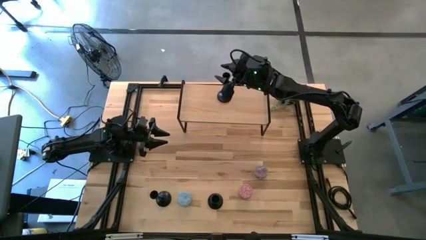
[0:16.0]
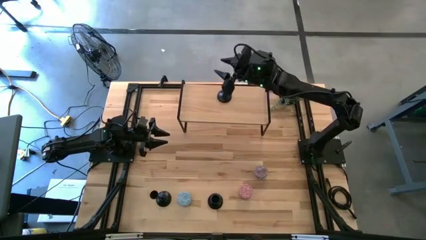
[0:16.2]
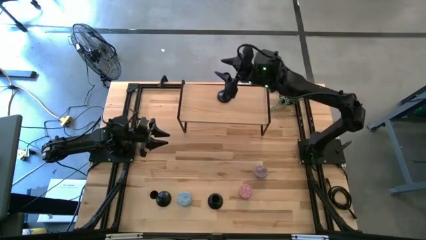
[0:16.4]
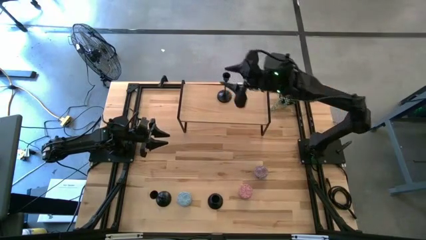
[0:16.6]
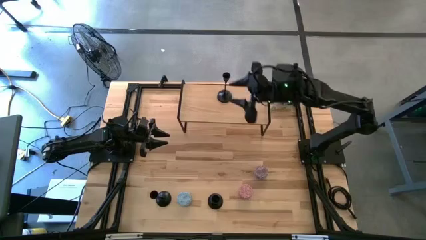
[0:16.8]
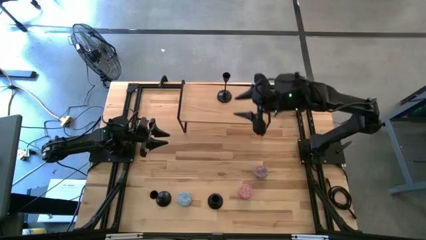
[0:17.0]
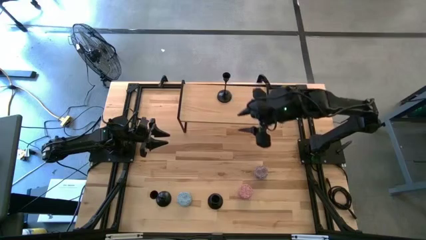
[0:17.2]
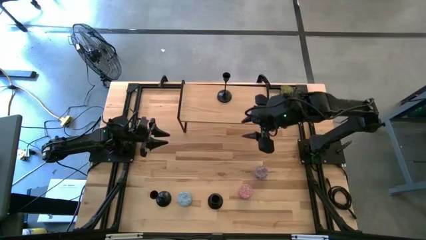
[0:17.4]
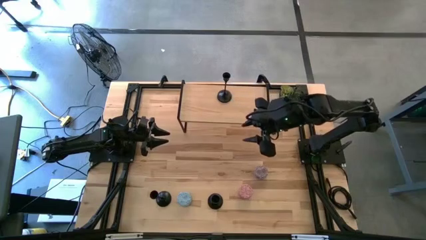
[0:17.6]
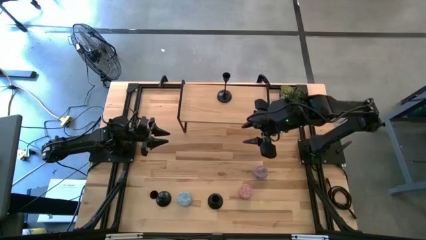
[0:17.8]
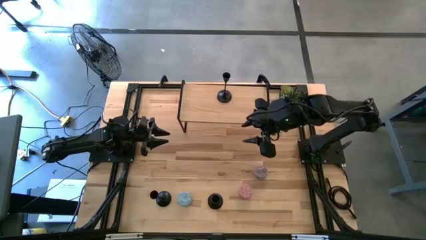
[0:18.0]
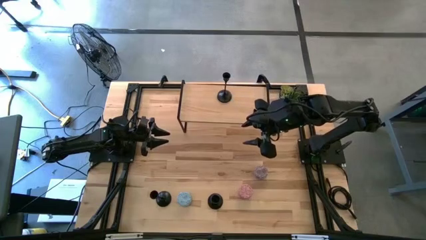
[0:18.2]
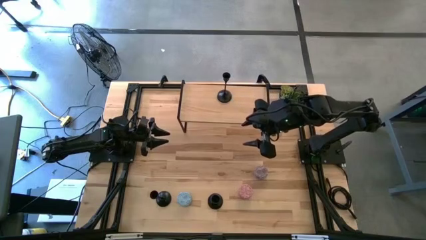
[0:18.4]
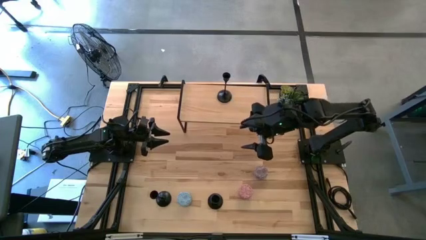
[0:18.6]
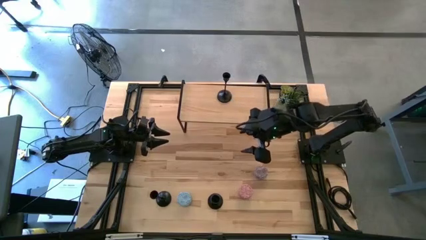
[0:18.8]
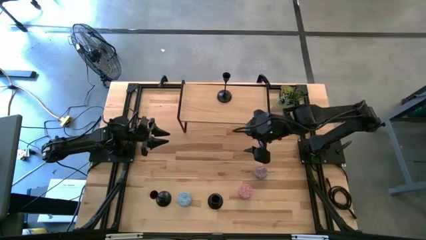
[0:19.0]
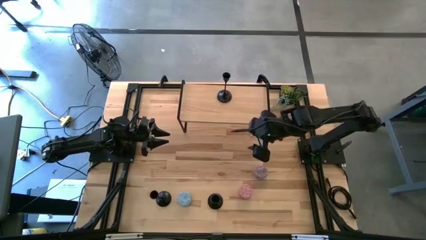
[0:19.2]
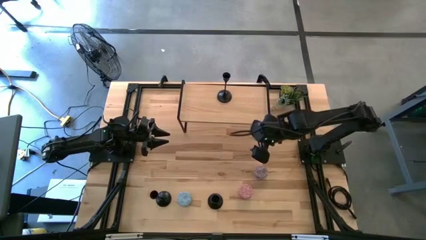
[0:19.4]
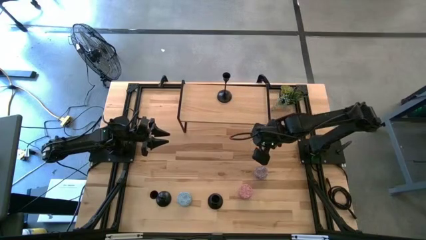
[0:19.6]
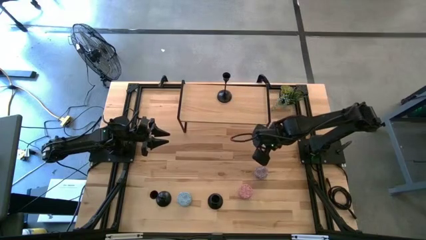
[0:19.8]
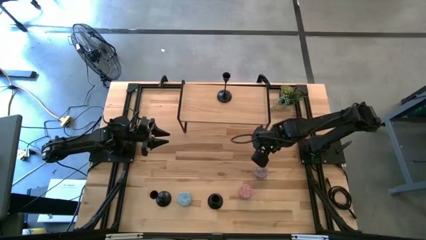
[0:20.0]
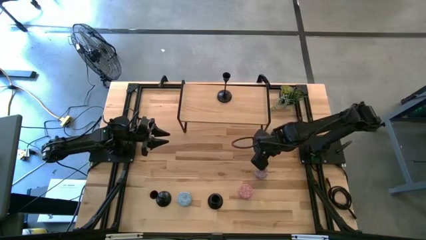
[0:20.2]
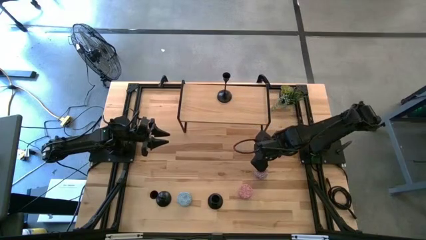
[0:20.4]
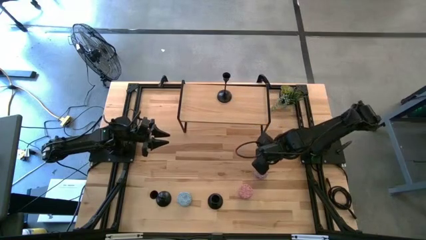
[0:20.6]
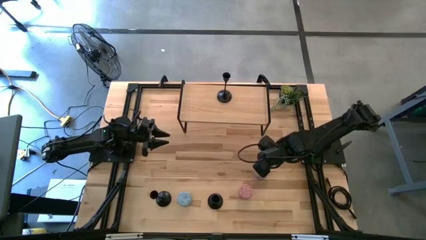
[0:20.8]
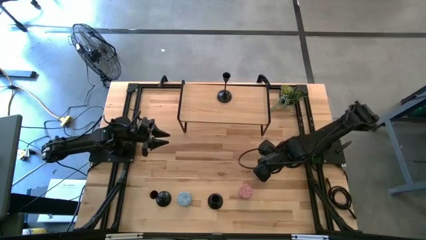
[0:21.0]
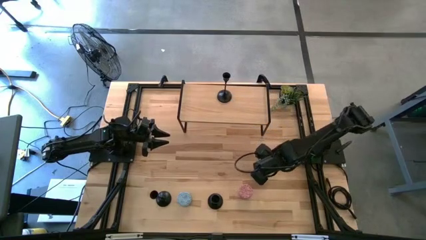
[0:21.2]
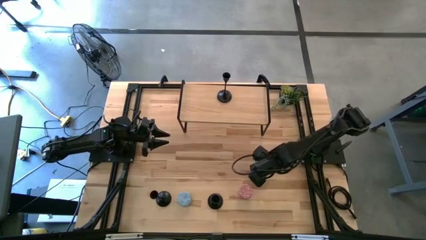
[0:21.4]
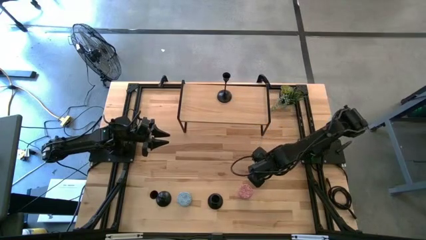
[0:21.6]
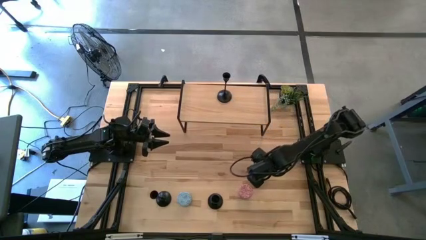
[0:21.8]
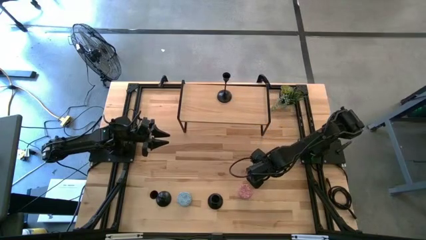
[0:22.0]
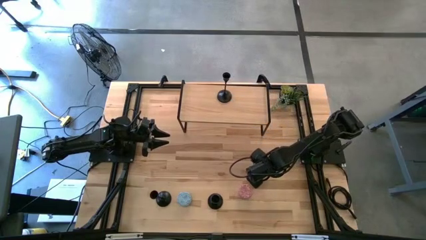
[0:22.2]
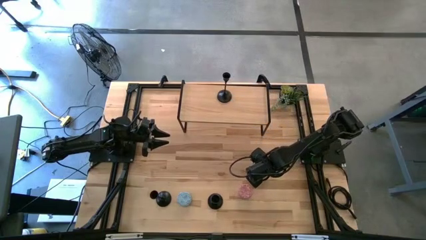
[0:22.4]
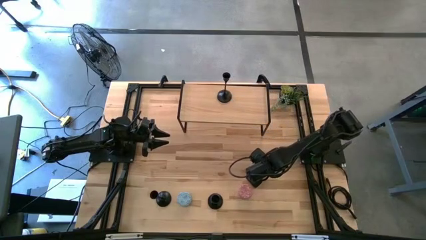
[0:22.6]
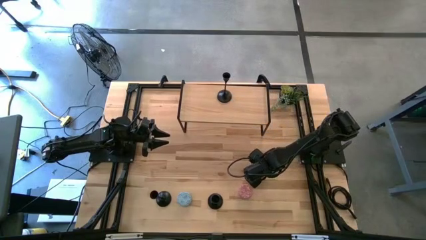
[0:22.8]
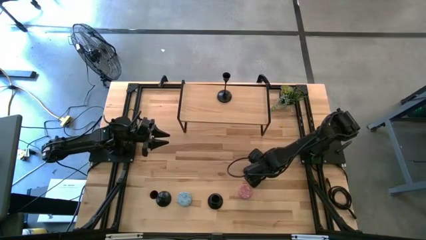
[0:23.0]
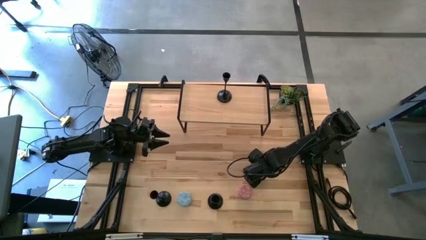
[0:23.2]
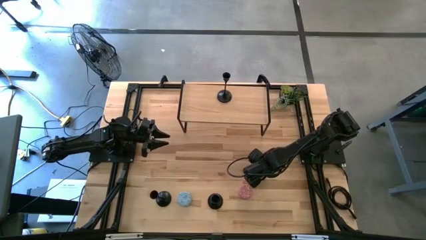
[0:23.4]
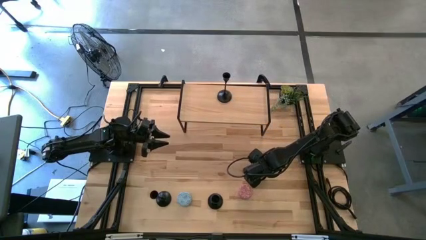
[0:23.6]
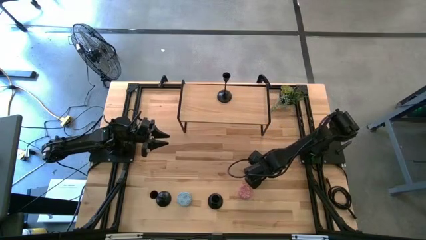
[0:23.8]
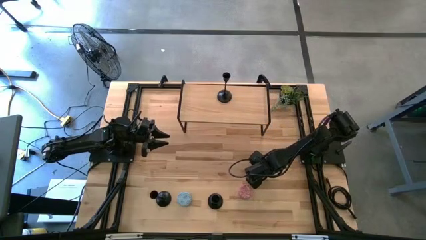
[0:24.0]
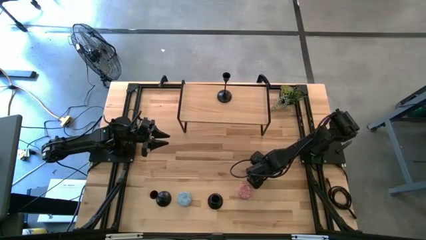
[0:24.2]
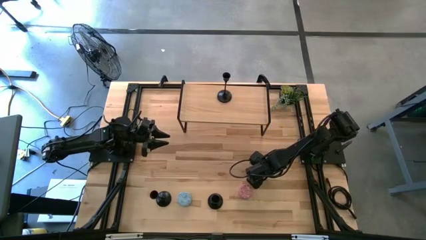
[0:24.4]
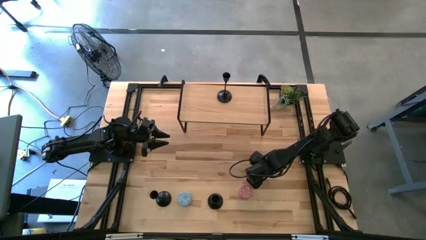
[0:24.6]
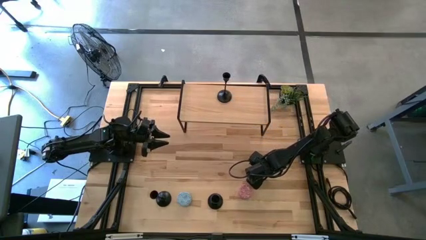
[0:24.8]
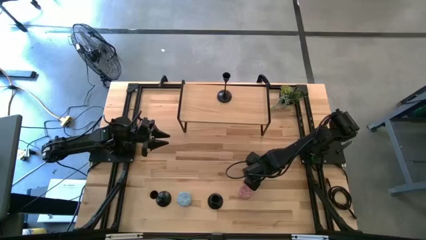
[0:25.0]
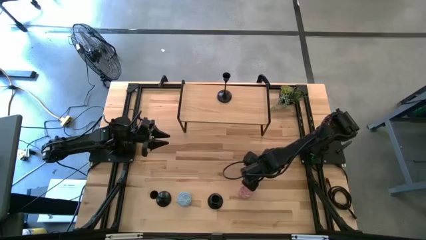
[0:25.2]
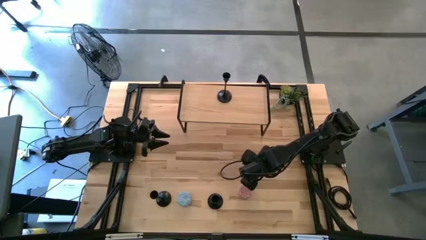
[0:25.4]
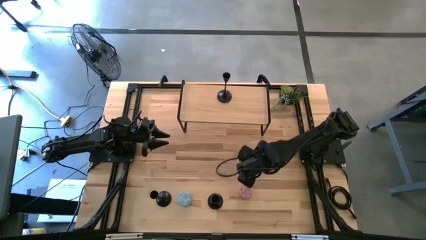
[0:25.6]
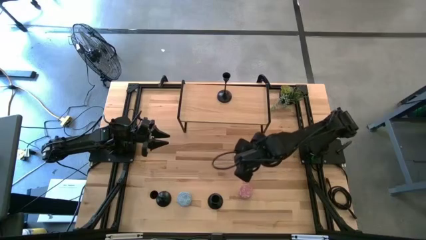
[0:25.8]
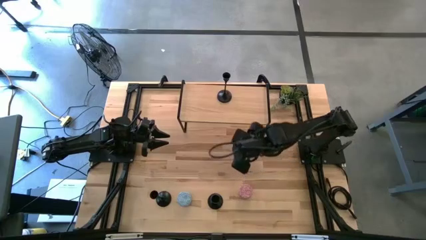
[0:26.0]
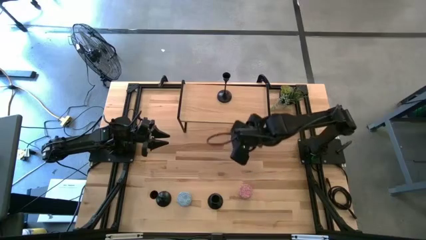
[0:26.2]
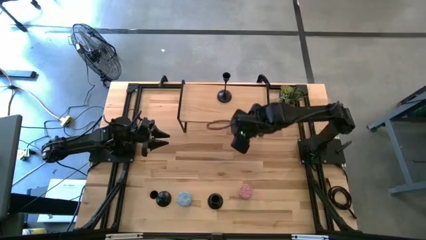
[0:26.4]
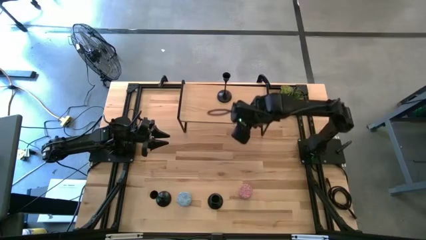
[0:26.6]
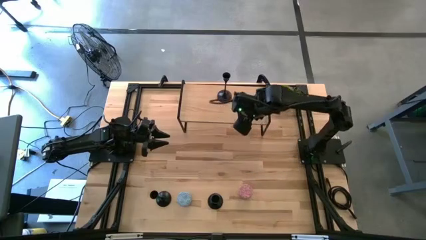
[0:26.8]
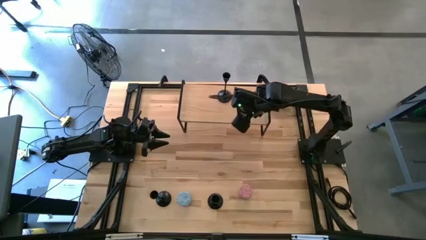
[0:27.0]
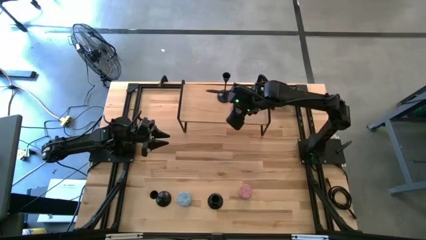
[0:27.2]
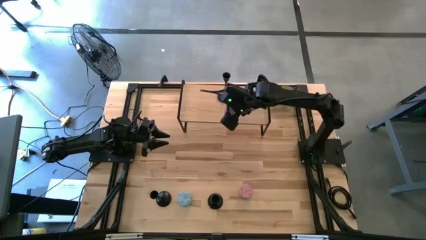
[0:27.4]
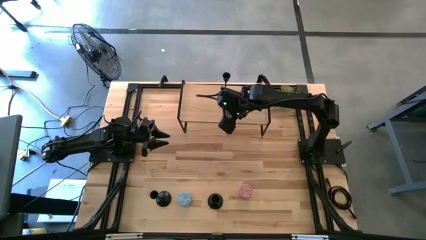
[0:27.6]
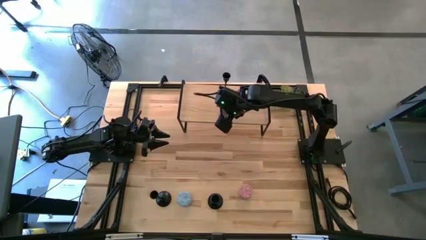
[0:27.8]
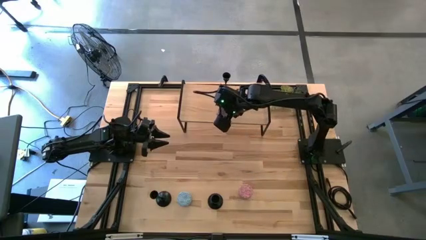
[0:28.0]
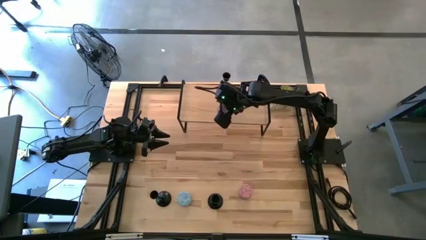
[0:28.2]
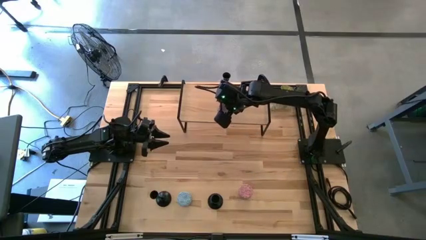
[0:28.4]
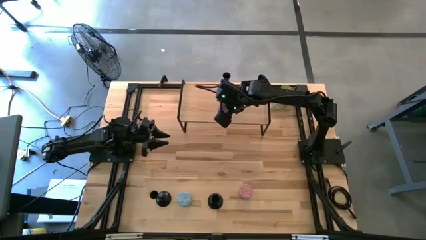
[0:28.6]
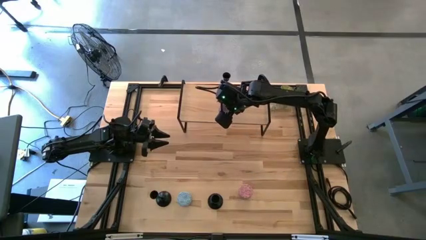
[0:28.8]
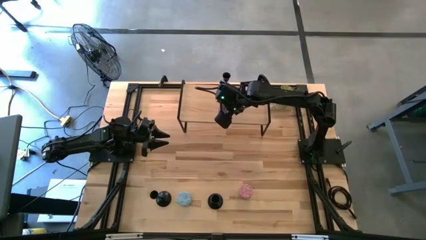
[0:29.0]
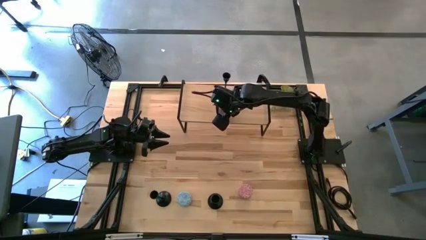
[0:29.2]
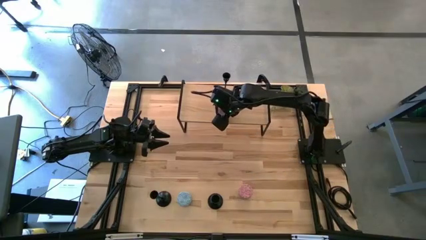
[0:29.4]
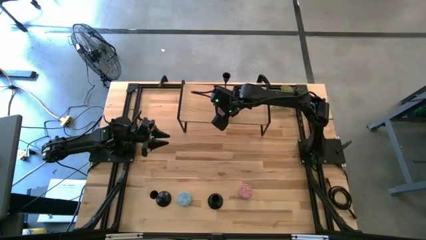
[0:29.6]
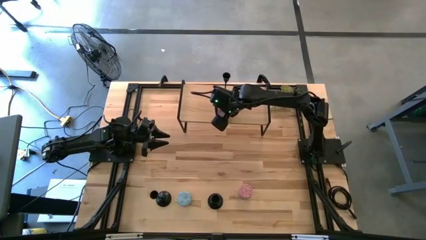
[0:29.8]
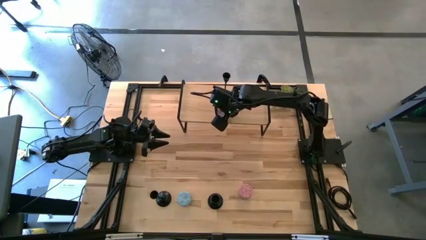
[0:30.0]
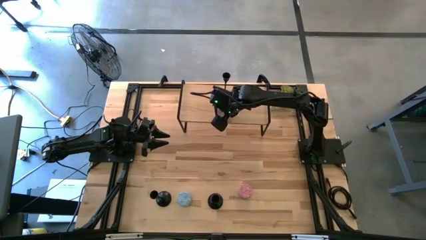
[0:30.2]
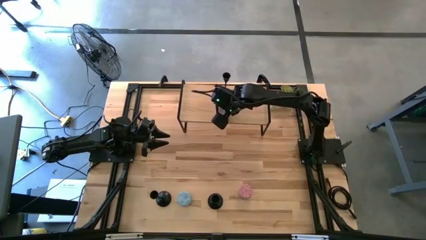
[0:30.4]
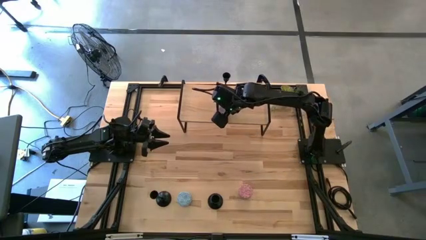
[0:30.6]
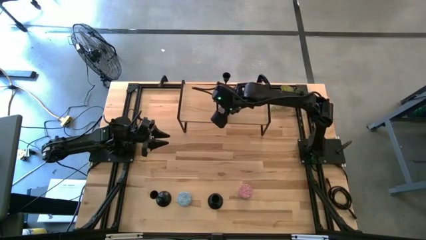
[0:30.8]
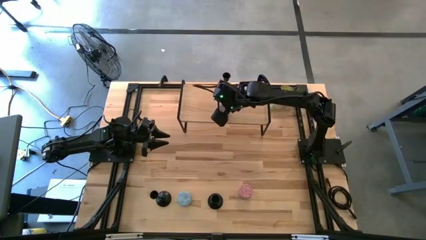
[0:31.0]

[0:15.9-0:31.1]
Task: Pick & Place candle stick holders
Put the red scented candle on the shelf
